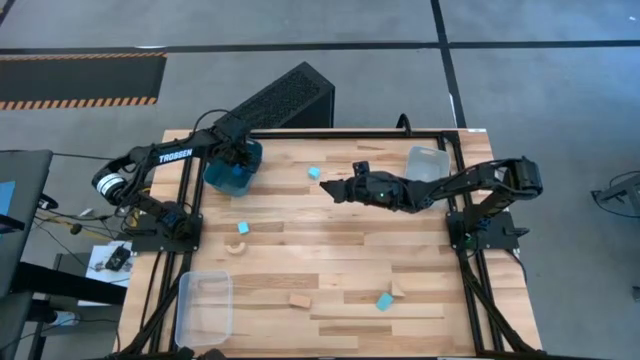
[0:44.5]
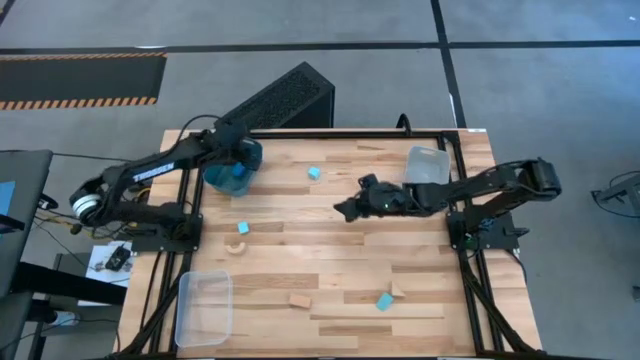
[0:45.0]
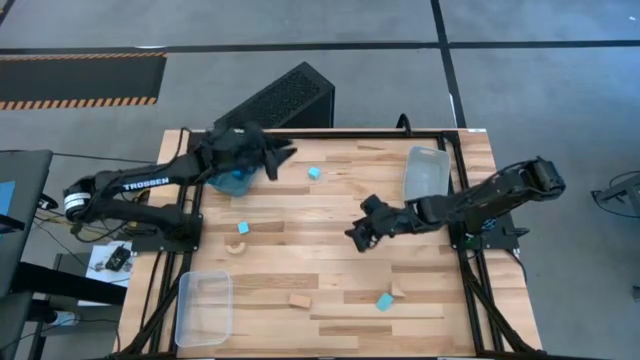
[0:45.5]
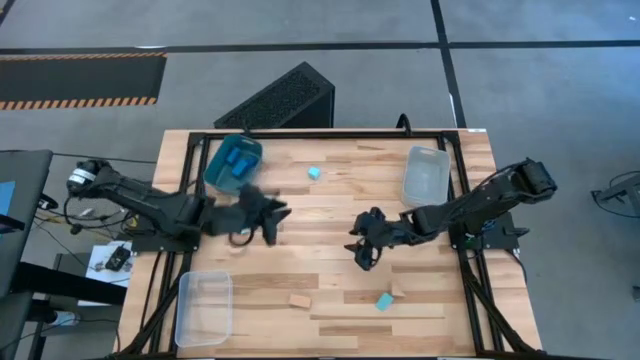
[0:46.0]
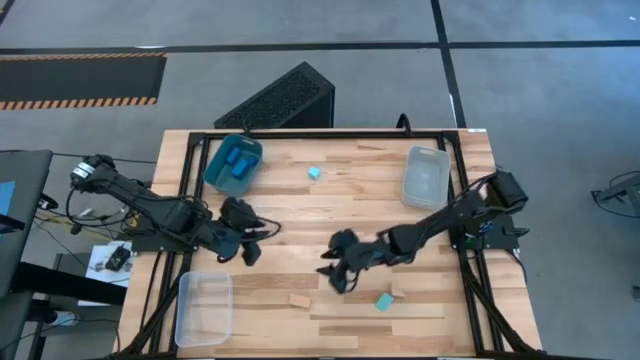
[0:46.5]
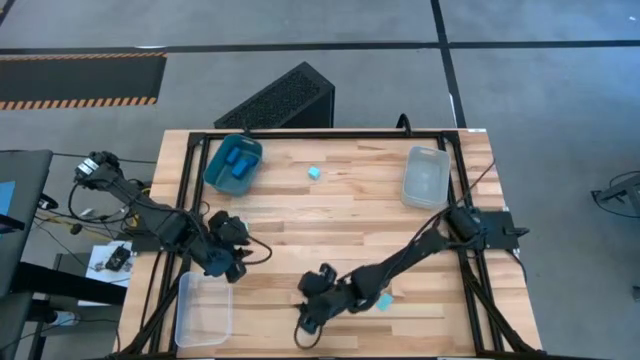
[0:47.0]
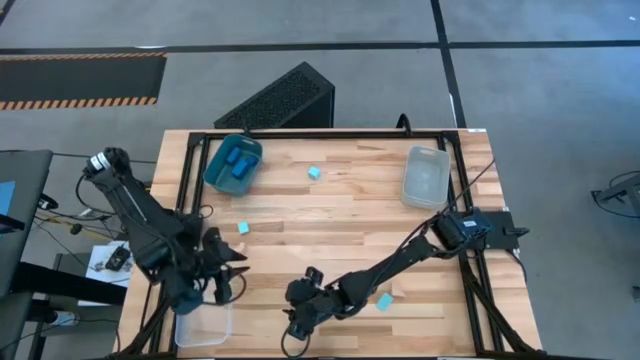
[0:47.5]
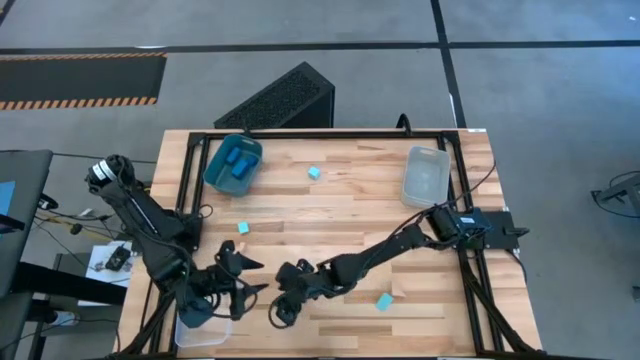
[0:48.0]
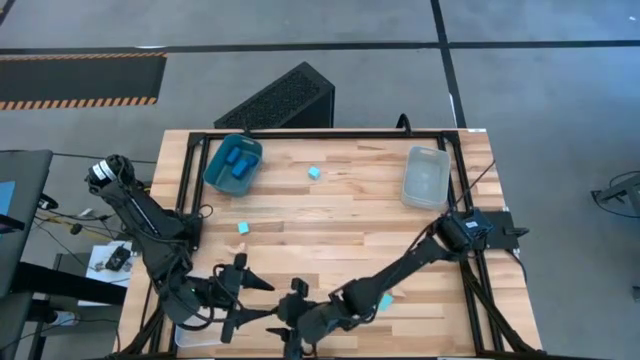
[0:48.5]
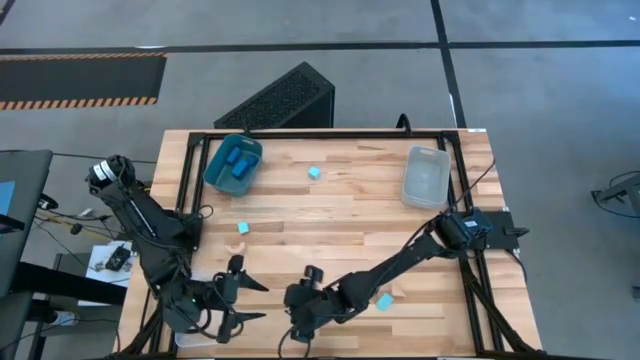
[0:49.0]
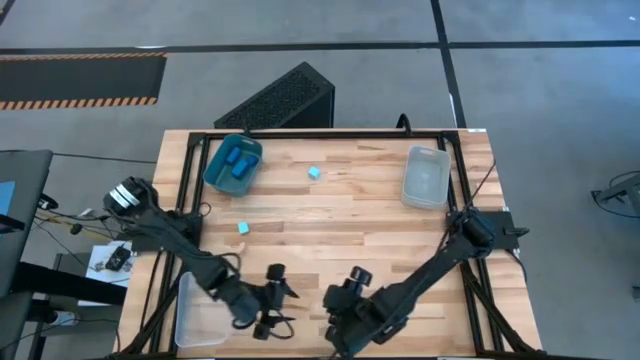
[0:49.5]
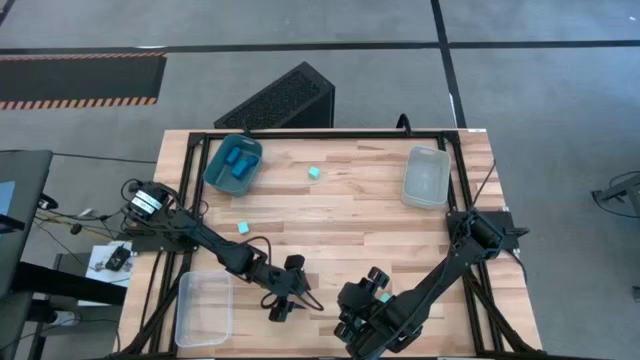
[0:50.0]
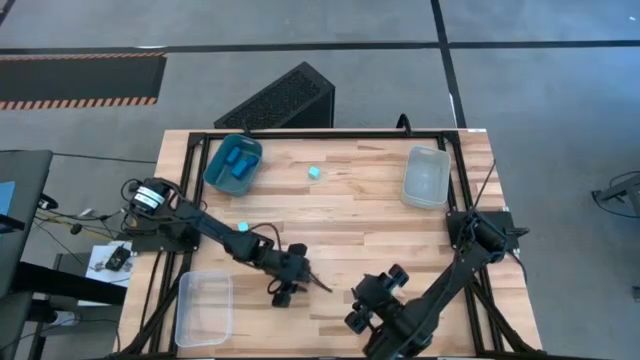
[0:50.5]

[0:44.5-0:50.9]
Task: Sort & place blocks by color
Put the middle brown block into the transparent bin

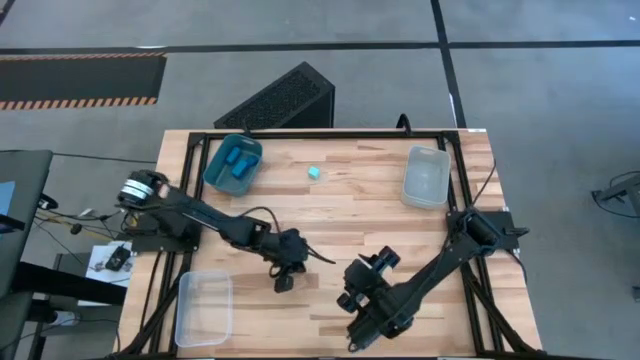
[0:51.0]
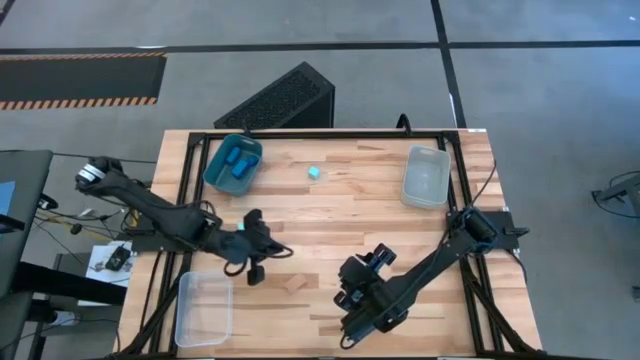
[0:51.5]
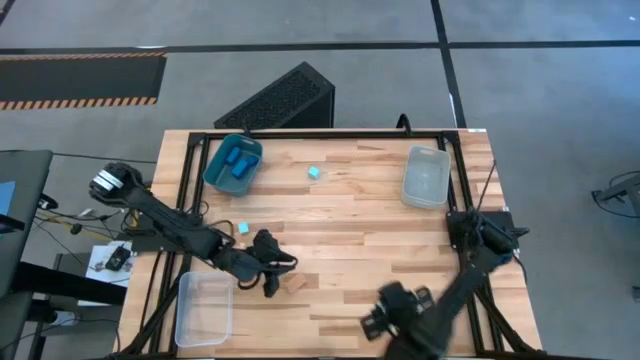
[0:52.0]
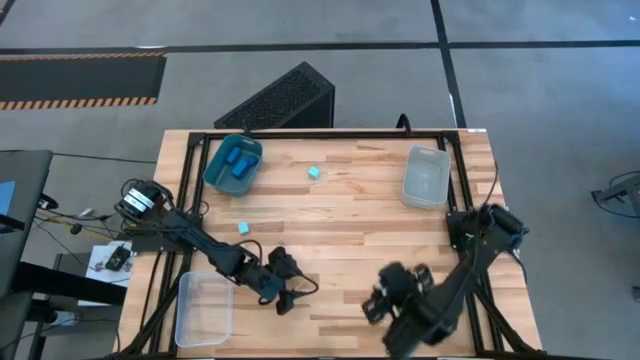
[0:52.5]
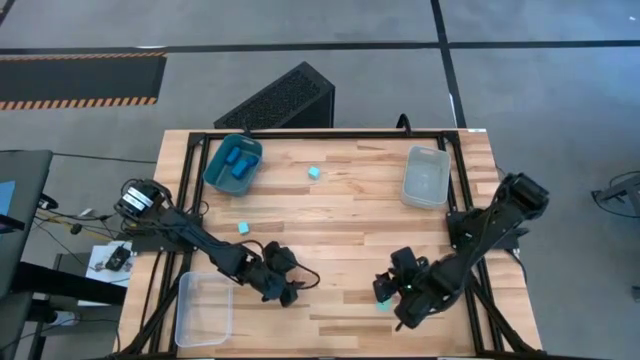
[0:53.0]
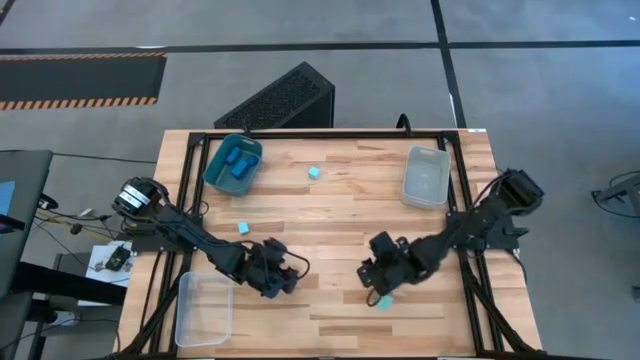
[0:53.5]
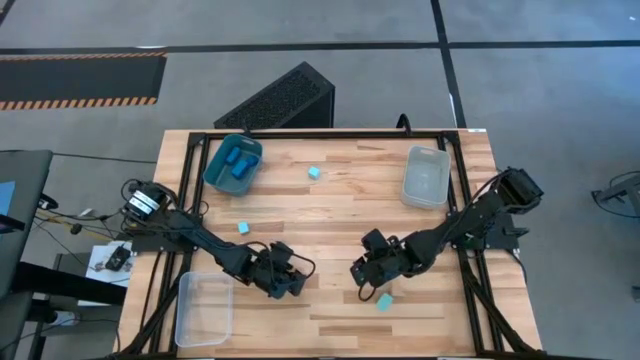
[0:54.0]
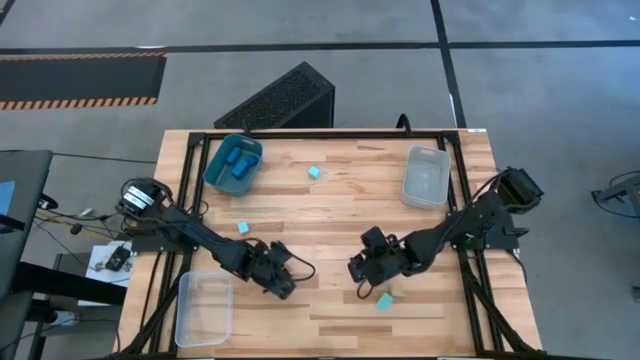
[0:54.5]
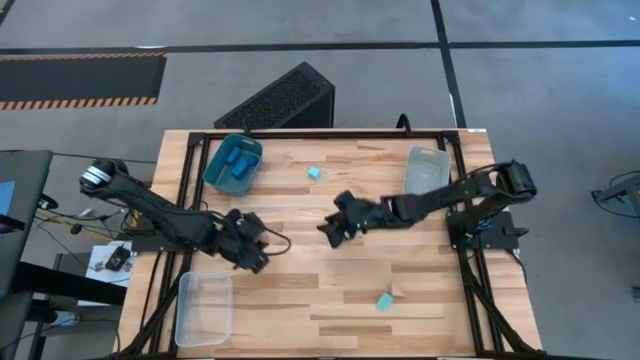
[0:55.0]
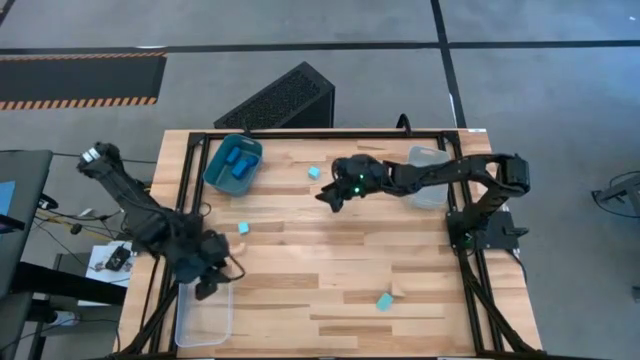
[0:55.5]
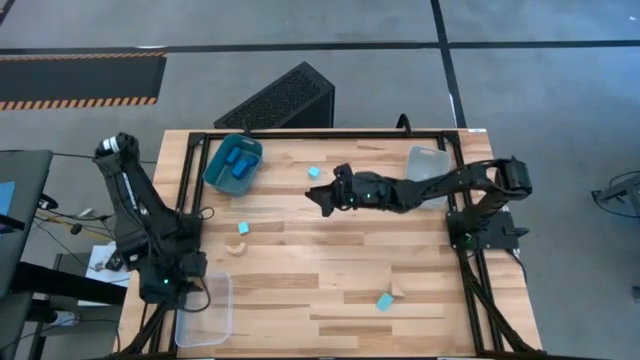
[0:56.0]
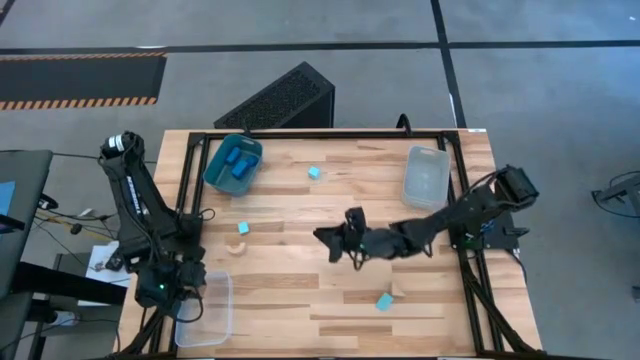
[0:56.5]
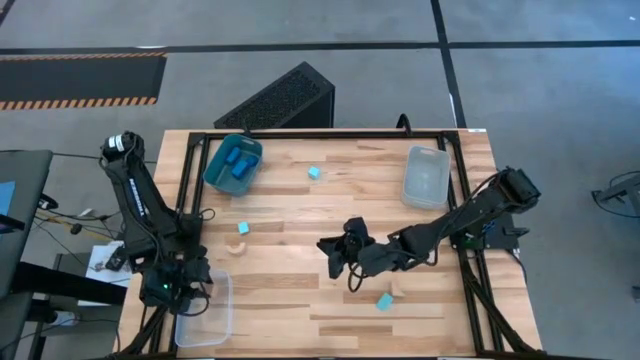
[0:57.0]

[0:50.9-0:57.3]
Put the middle brown block into the transparent bin

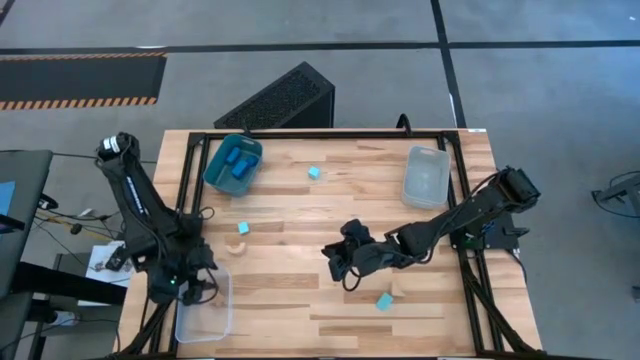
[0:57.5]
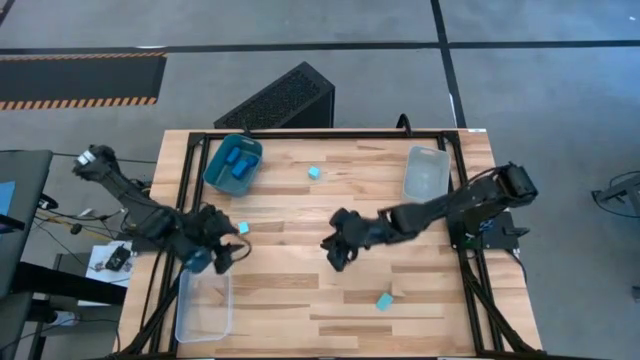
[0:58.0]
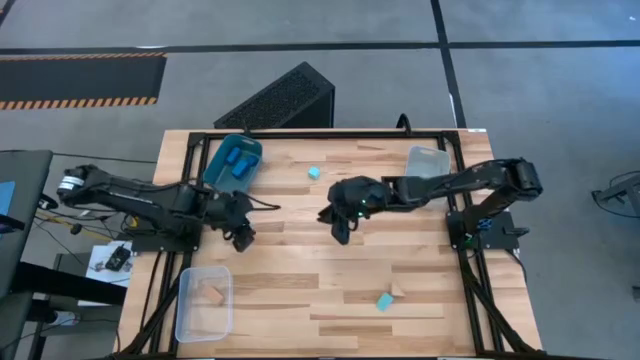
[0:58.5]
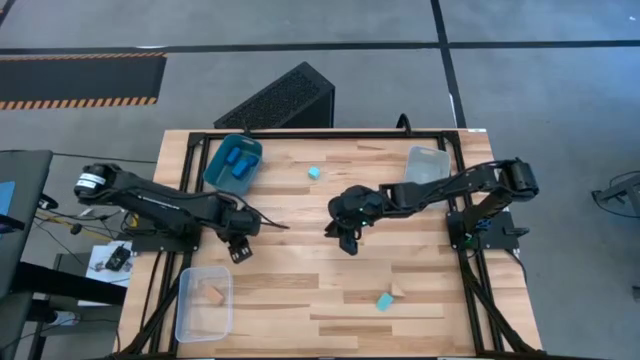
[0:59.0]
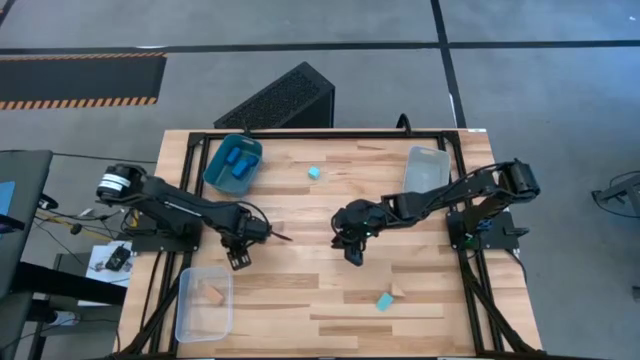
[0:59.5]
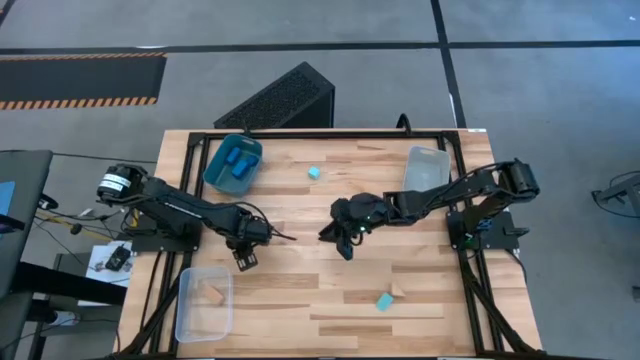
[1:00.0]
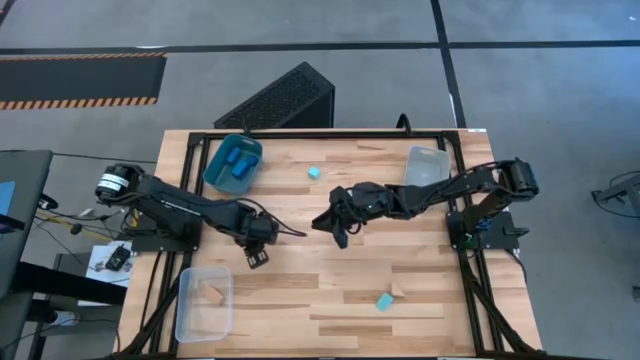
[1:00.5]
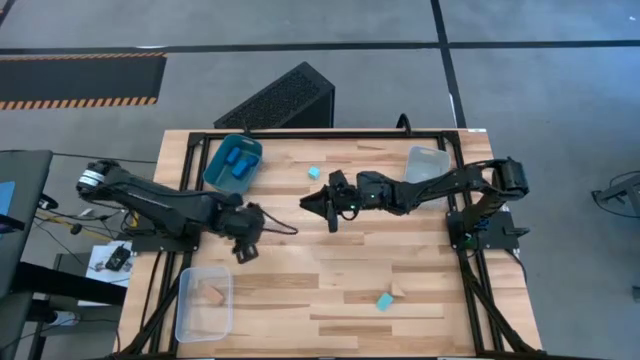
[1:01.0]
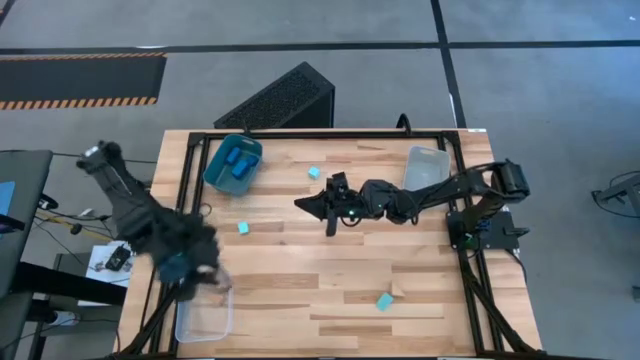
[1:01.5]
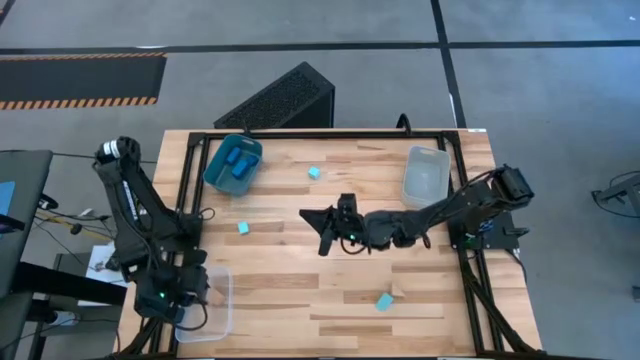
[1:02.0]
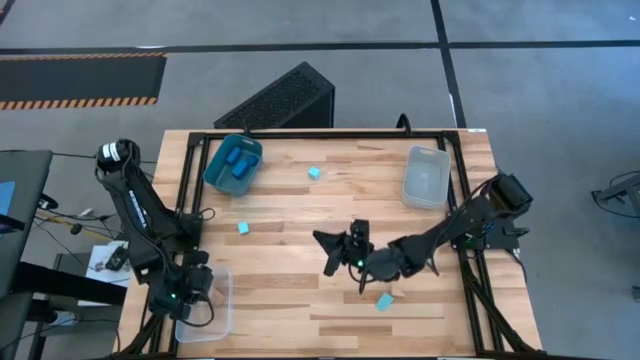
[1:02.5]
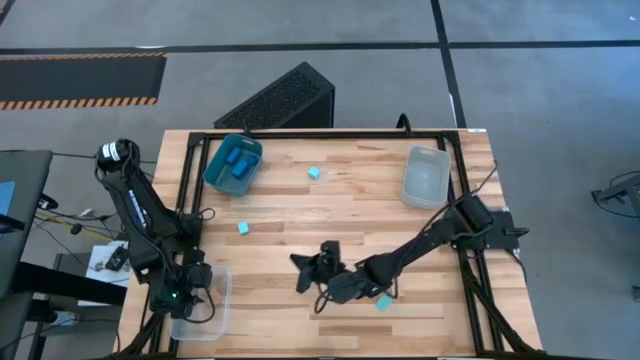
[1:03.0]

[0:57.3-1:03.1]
Put the top brown block into the transparent bin

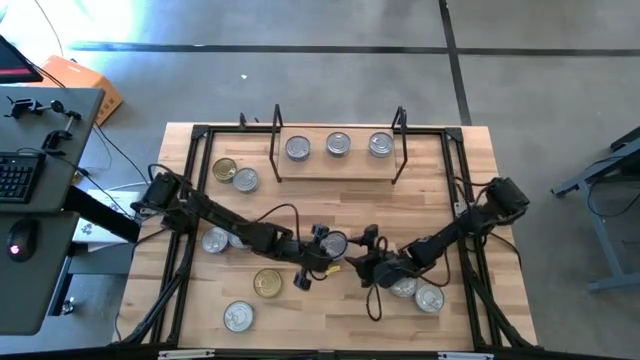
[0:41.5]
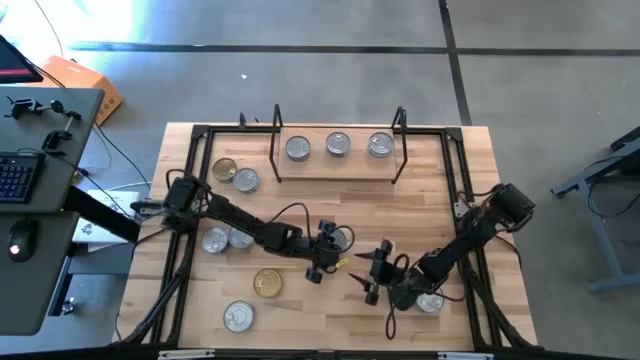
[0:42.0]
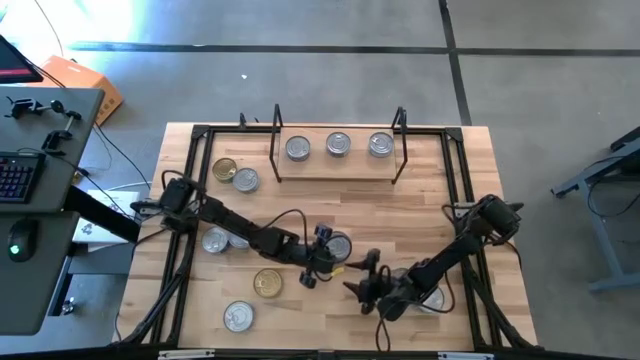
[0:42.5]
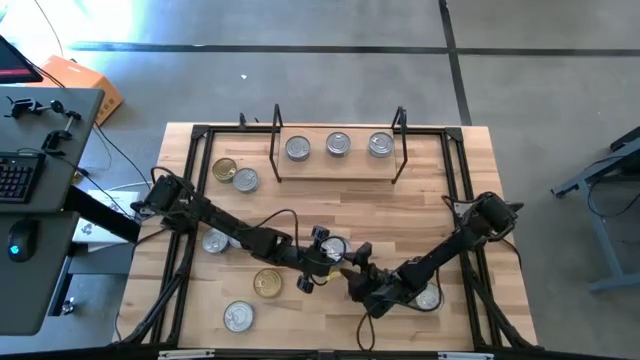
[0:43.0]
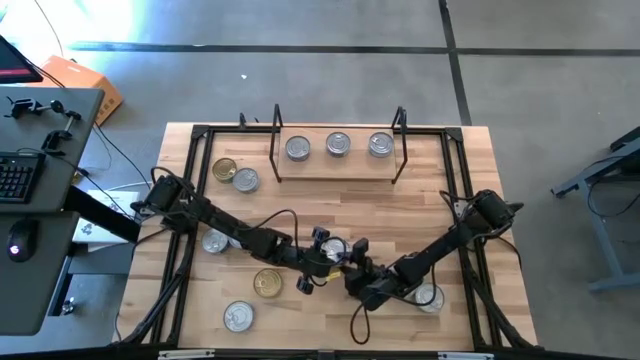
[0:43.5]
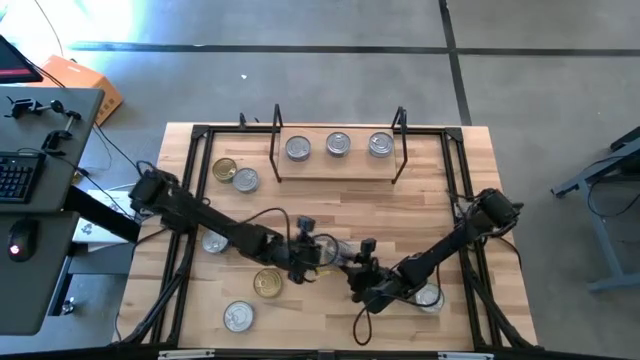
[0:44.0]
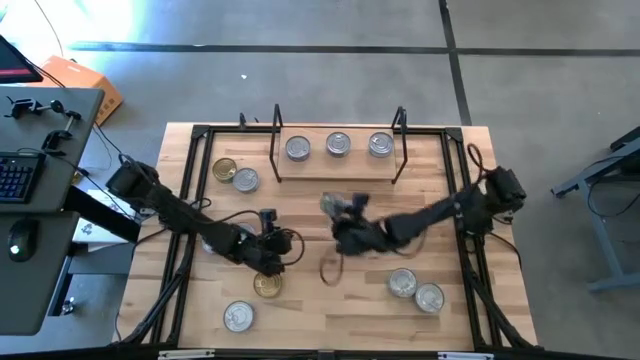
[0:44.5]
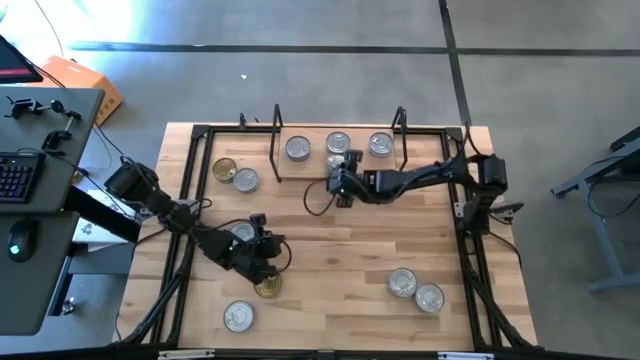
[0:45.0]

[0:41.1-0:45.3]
Task: Stack canned seafood by type on shelf
Put the green tuna can on the shelf
